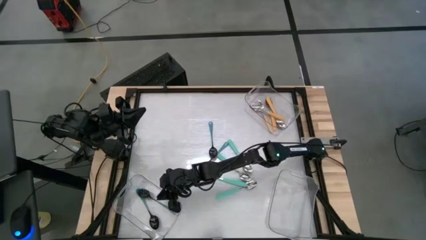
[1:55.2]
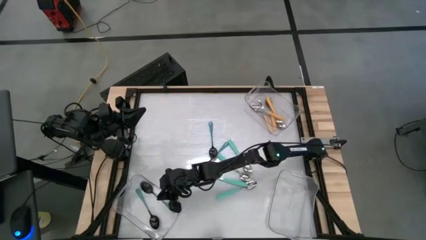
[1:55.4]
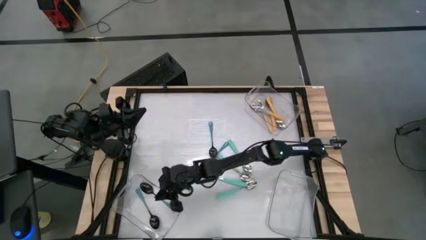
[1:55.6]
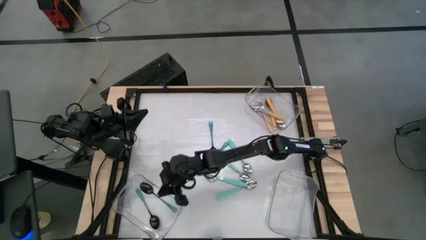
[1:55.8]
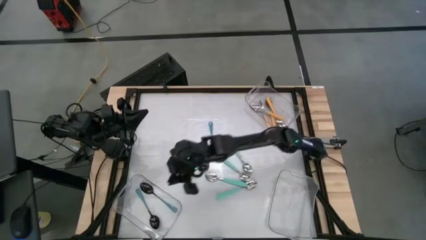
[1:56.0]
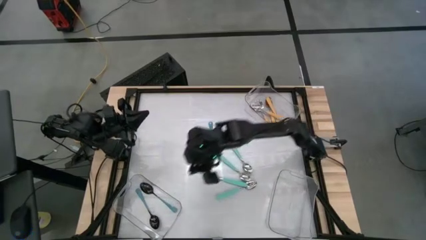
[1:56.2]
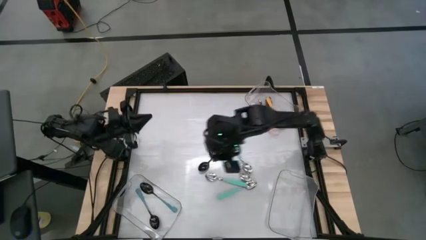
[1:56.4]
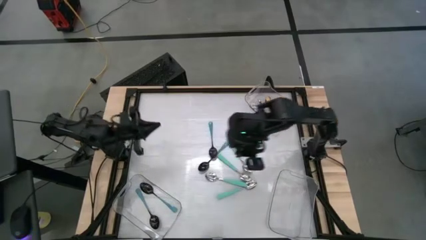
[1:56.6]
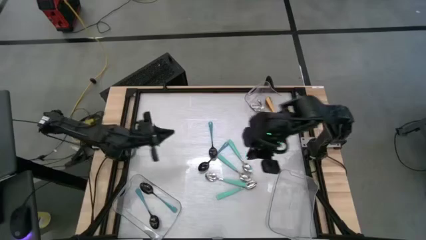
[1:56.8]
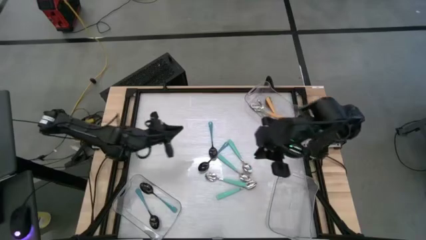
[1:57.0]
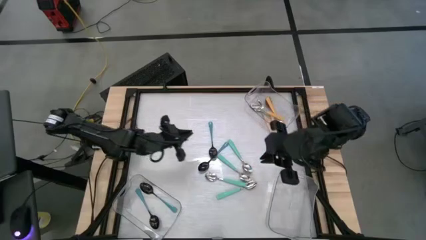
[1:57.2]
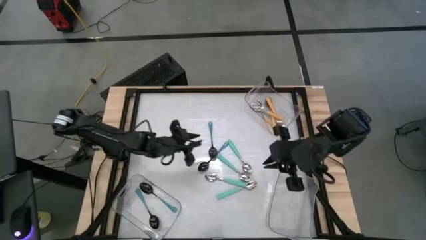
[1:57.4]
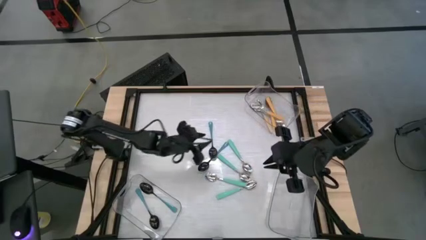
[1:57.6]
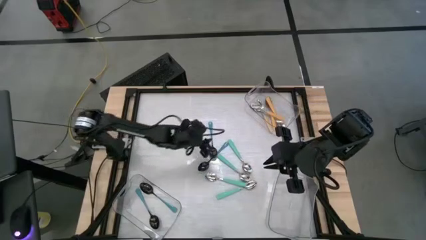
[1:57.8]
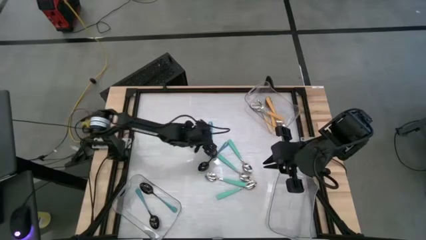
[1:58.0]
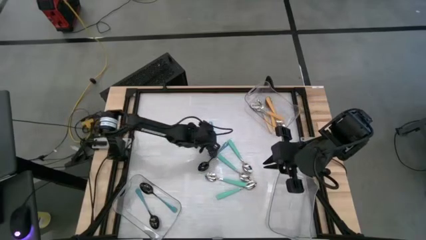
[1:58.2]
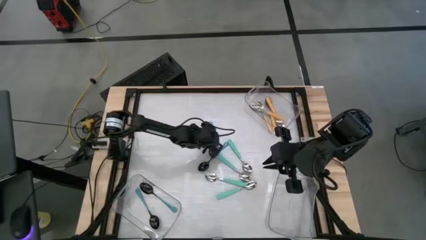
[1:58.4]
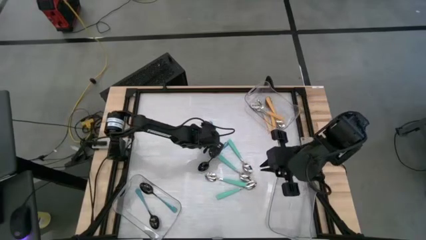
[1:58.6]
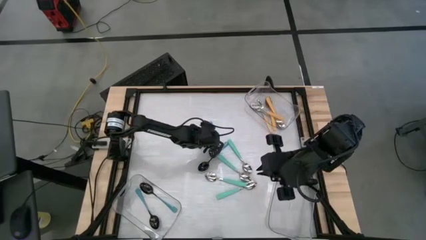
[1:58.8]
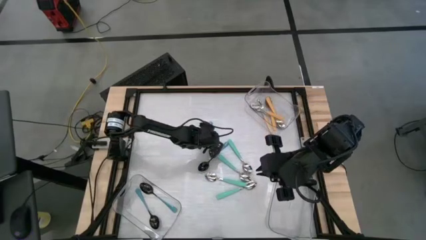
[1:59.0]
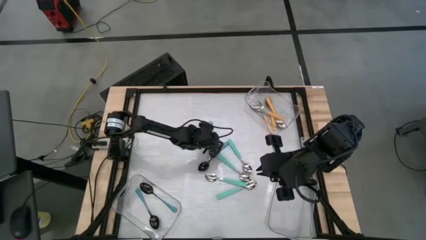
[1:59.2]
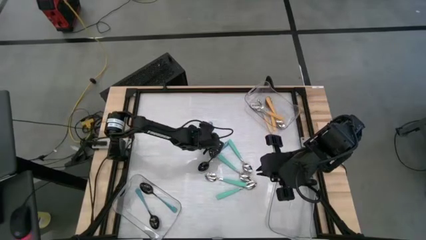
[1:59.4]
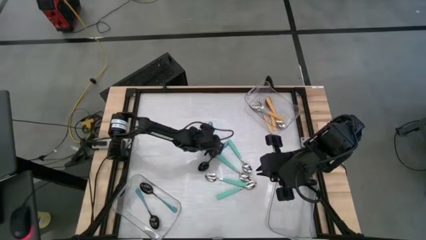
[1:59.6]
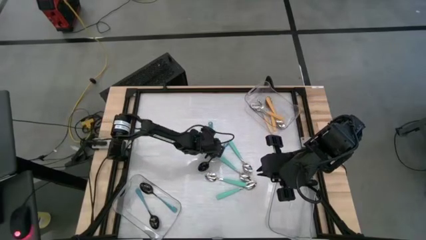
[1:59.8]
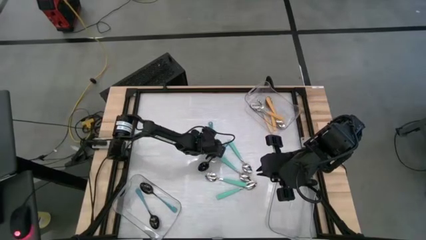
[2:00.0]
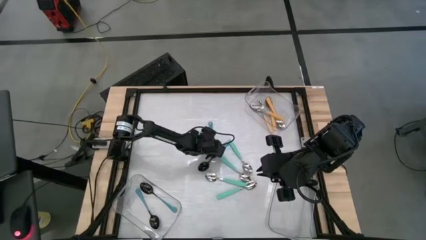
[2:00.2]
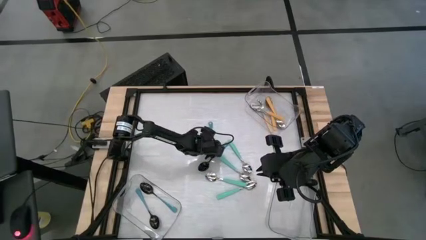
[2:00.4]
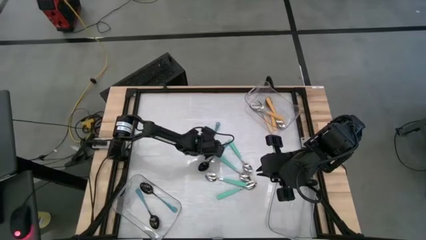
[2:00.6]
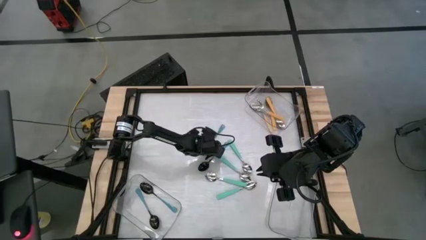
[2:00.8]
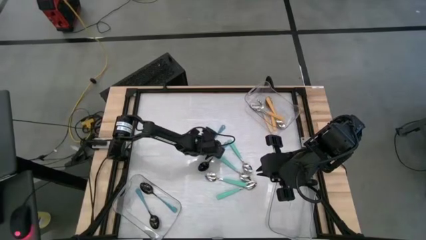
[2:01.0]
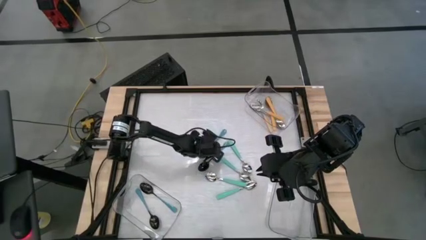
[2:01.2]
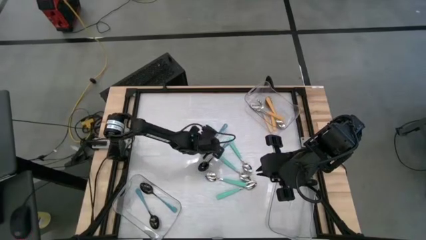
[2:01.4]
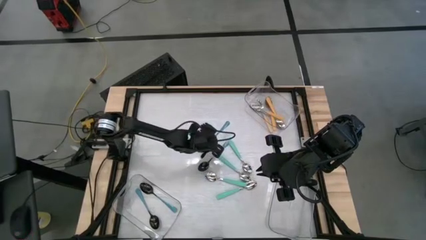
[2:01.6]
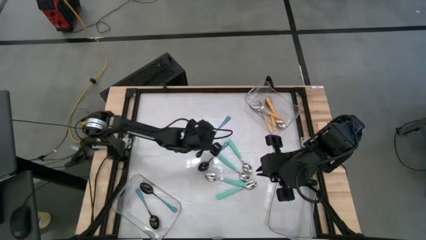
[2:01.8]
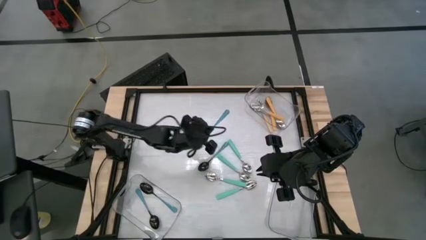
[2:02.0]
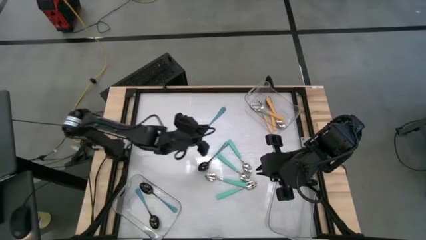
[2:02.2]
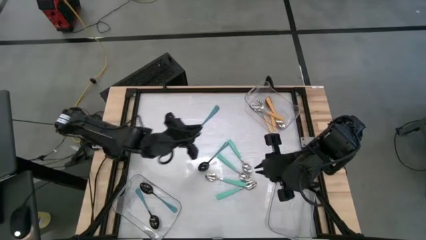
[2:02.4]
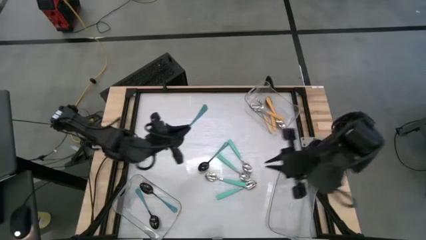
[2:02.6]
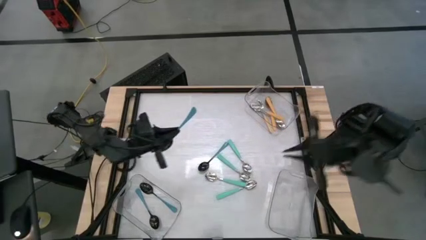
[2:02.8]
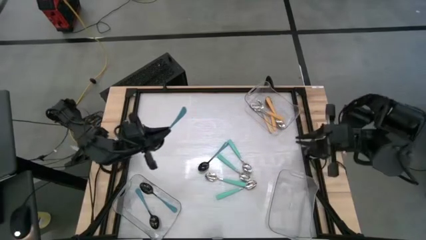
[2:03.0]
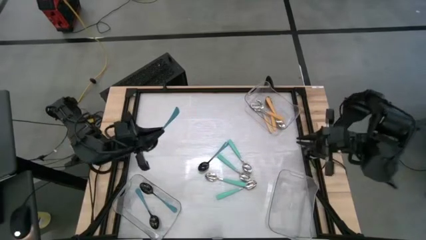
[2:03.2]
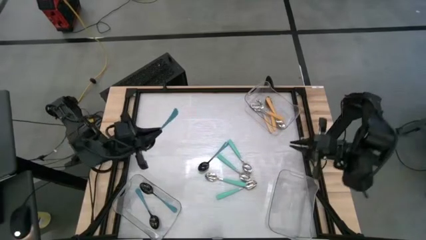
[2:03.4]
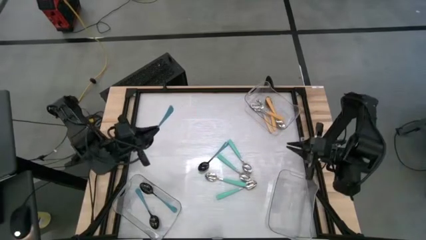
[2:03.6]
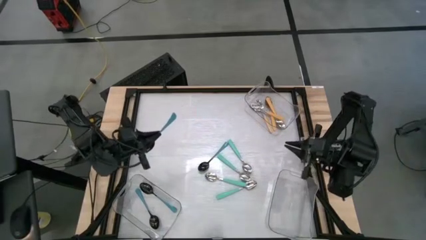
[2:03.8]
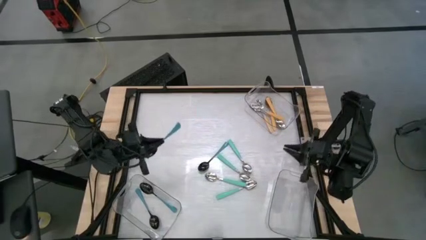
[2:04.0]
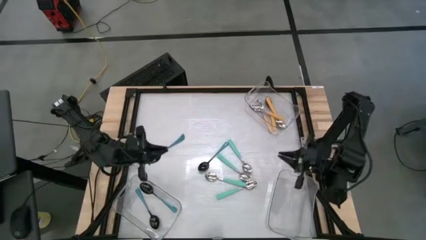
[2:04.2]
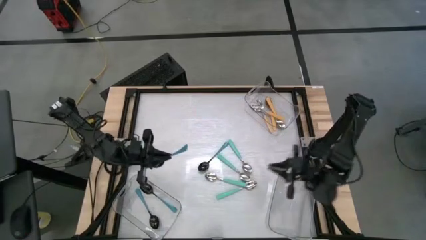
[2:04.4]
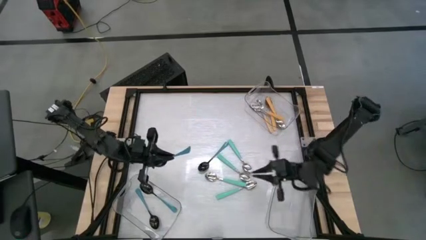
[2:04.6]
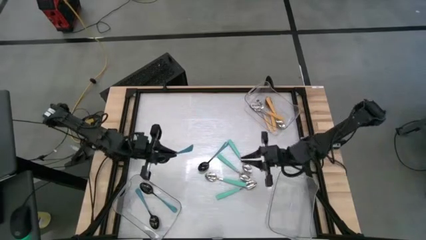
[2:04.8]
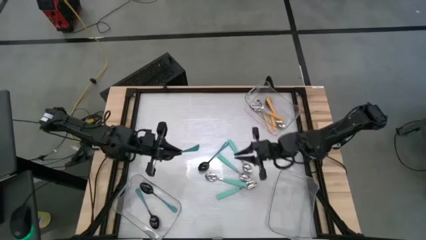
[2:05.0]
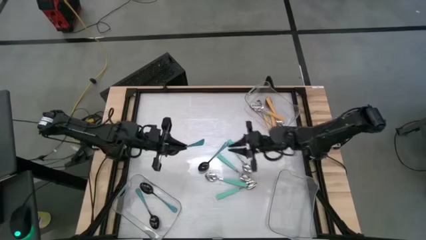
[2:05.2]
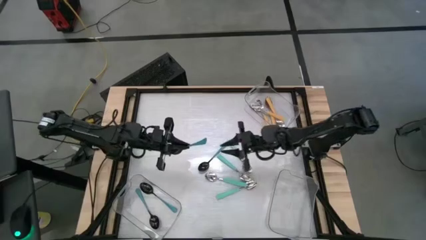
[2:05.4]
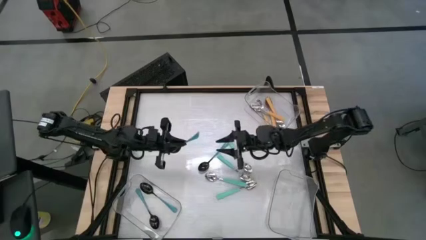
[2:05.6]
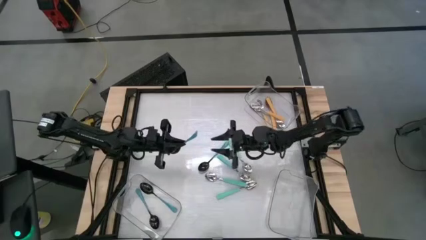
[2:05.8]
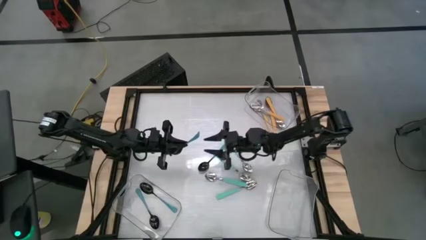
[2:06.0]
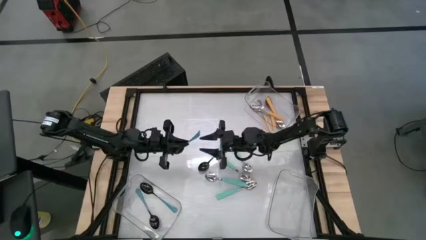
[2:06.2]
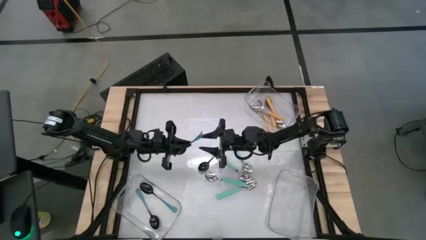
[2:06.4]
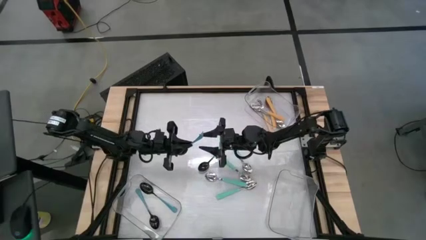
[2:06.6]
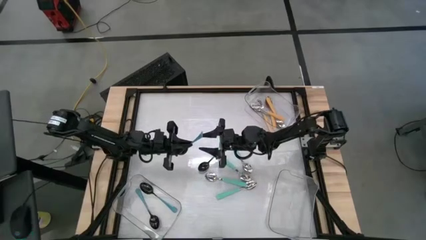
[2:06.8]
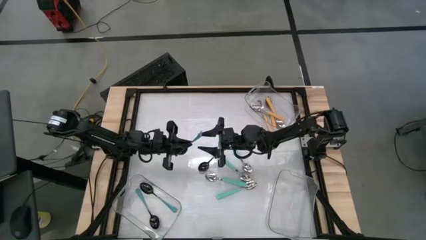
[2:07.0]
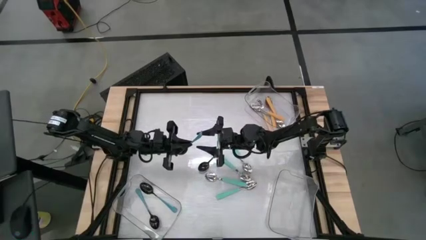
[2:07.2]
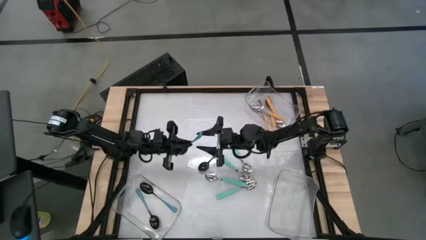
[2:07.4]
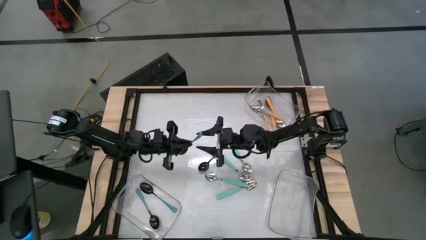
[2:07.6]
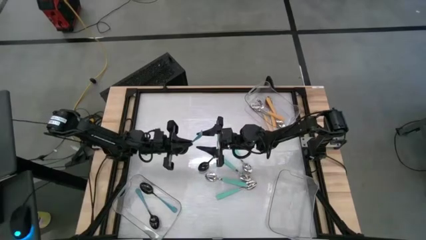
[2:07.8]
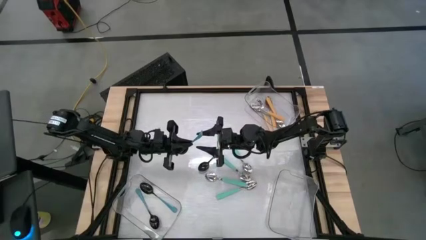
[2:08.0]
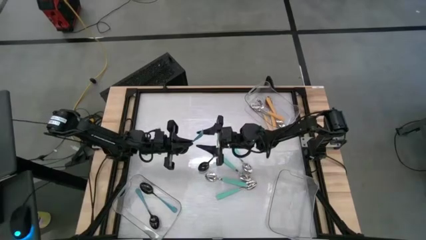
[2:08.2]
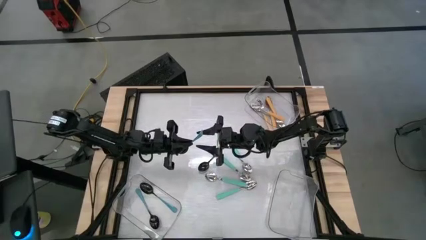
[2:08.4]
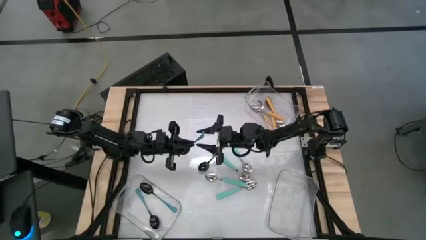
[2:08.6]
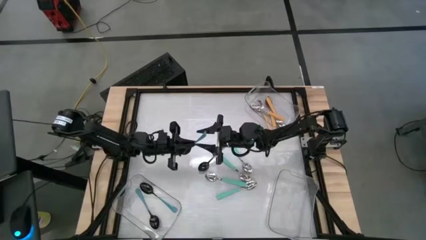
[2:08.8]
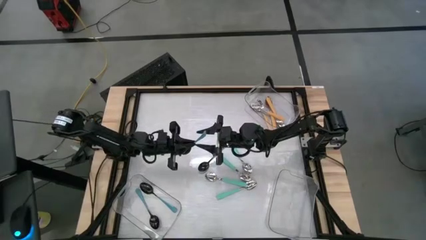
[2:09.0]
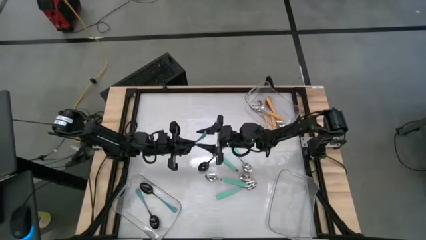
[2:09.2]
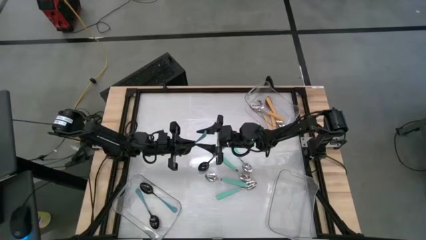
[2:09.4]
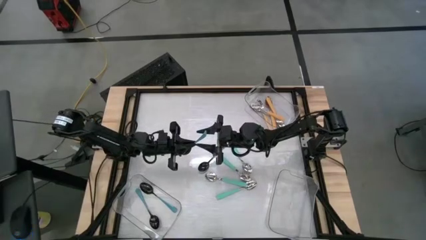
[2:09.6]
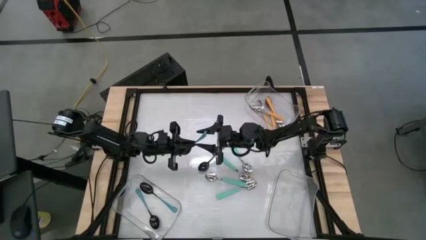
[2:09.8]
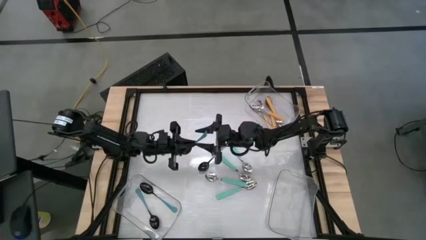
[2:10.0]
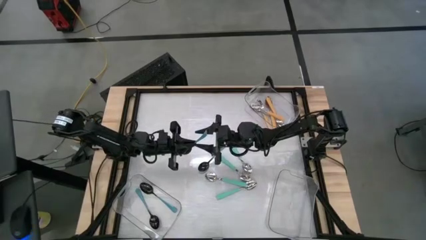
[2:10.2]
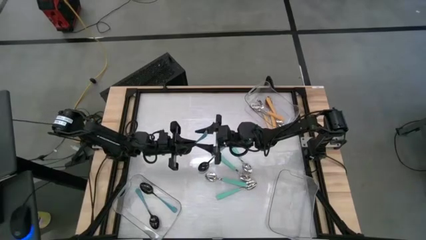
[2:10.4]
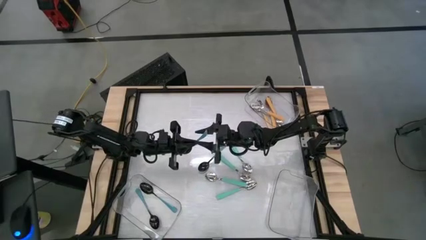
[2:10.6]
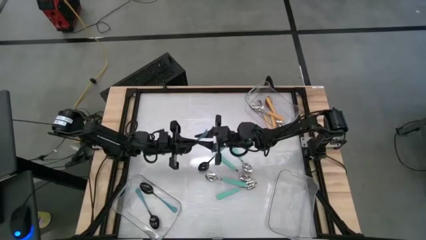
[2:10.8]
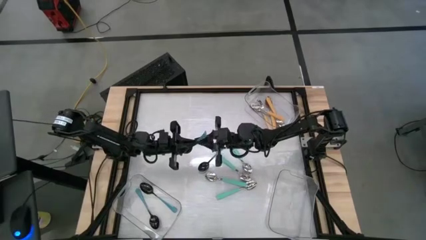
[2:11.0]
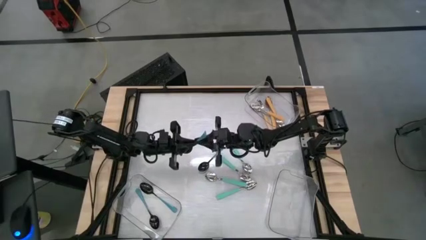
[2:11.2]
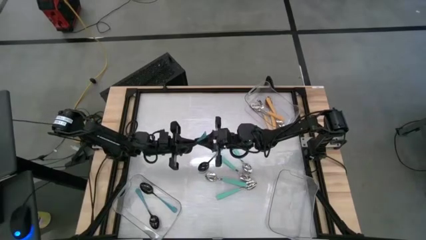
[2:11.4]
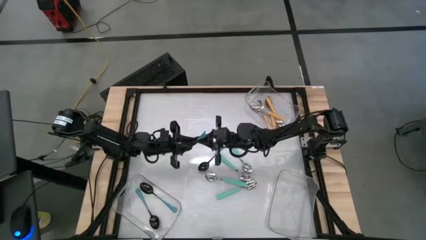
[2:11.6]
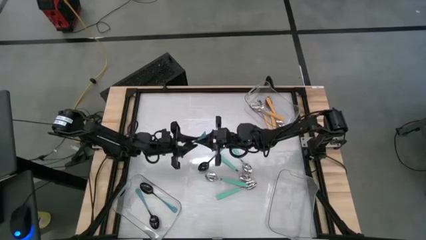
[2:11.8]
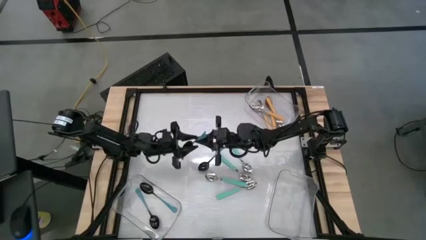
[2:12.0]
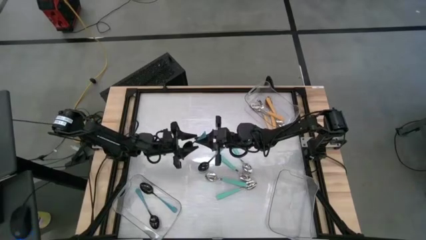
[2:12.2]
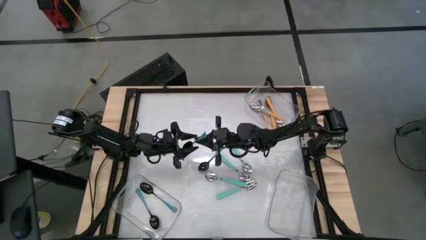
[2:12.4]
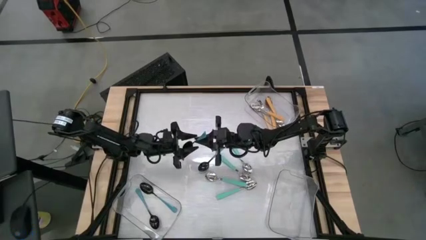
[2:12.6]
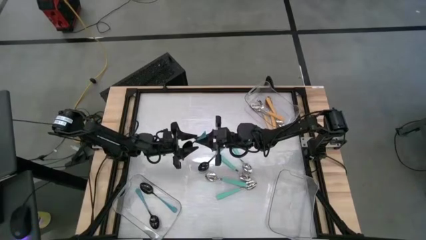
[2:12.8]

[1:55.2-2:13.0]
Task: Sort silverware by color (type)
Put the blue spoon into the bottom left transparent bin
